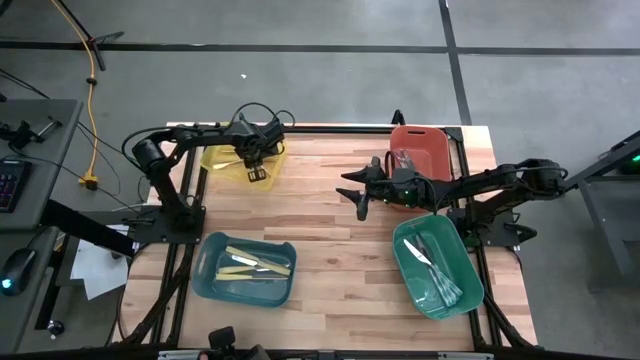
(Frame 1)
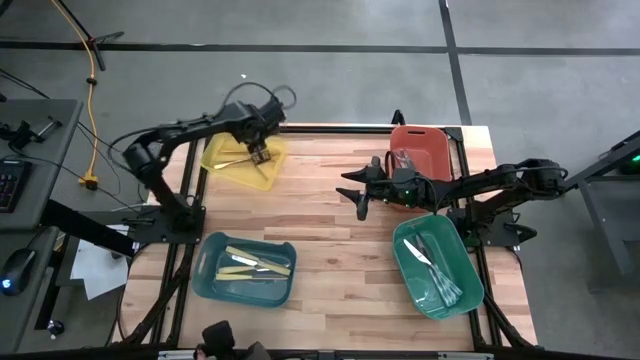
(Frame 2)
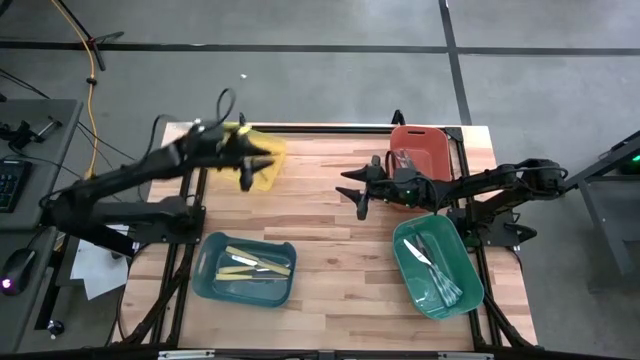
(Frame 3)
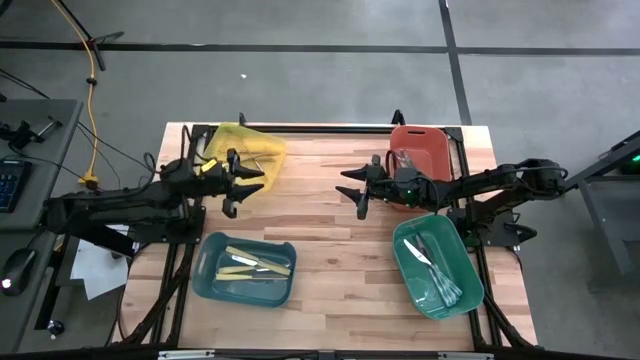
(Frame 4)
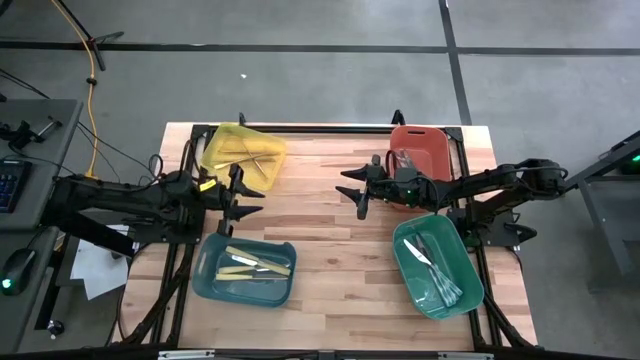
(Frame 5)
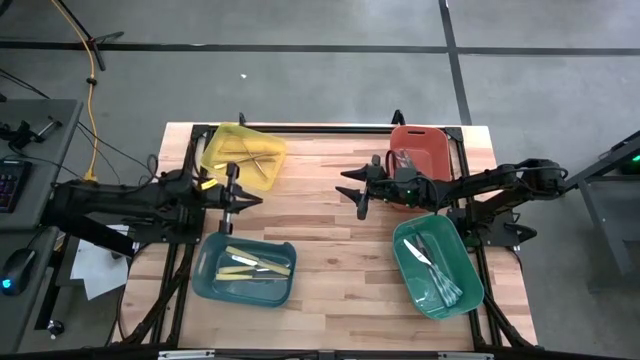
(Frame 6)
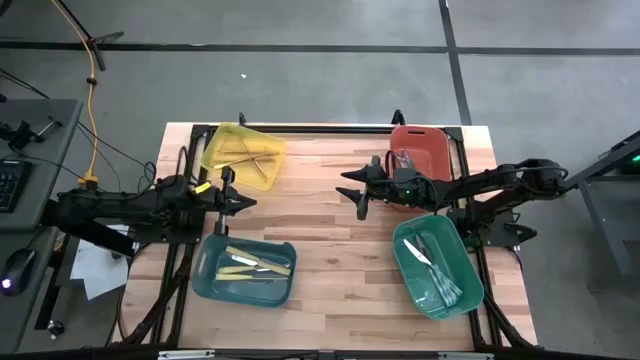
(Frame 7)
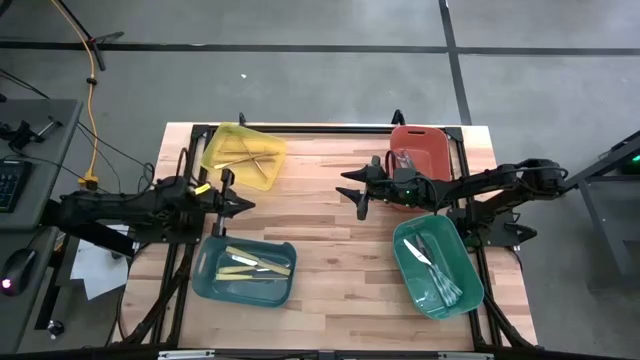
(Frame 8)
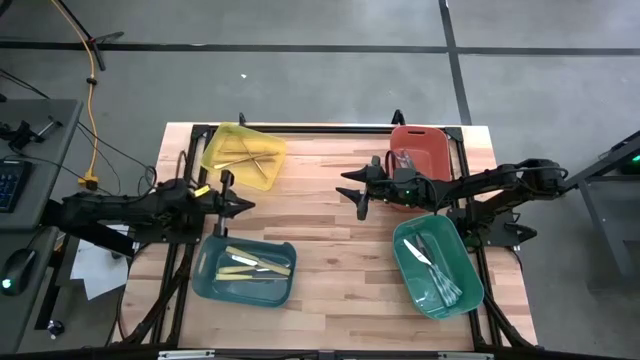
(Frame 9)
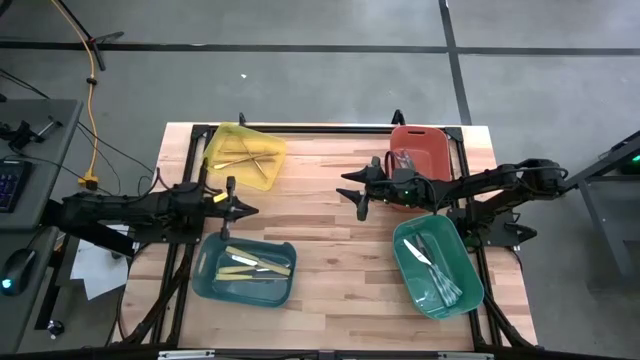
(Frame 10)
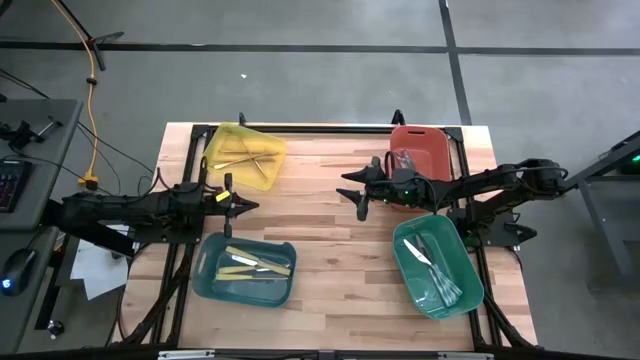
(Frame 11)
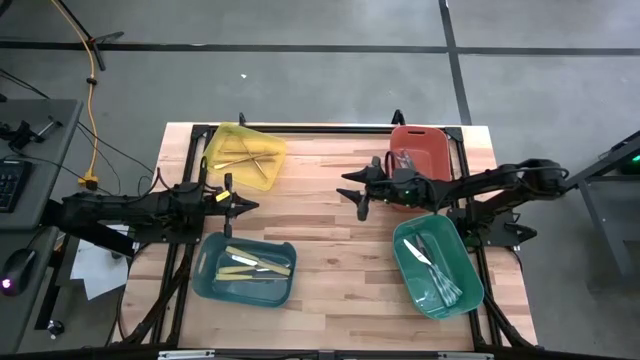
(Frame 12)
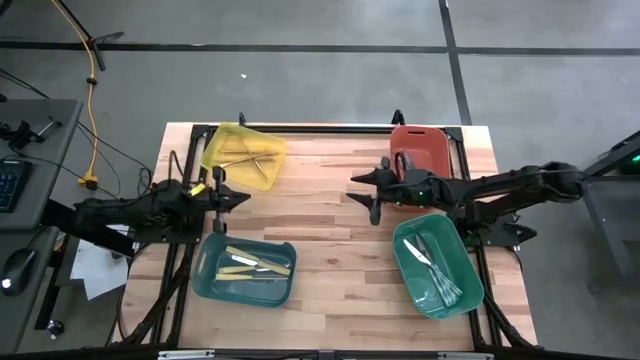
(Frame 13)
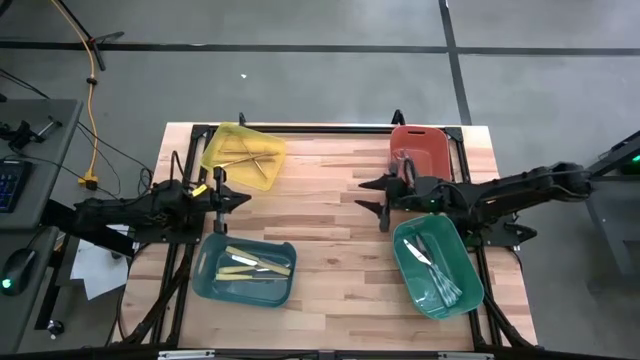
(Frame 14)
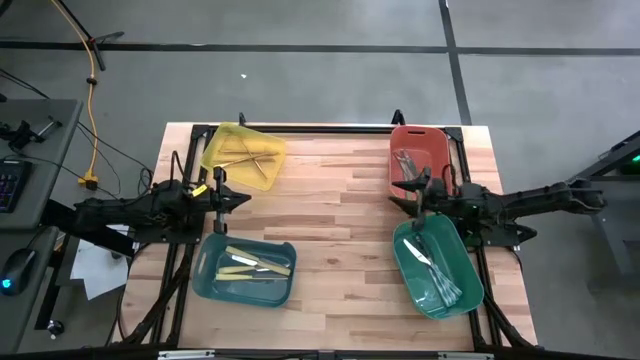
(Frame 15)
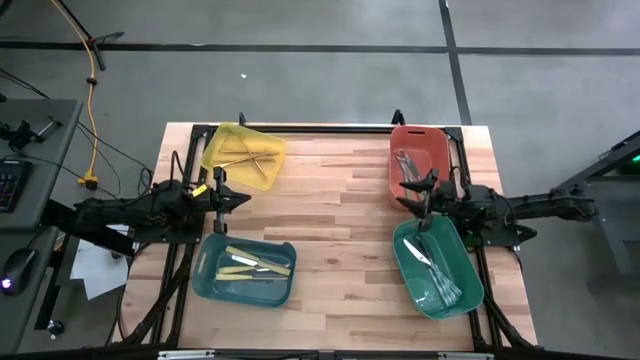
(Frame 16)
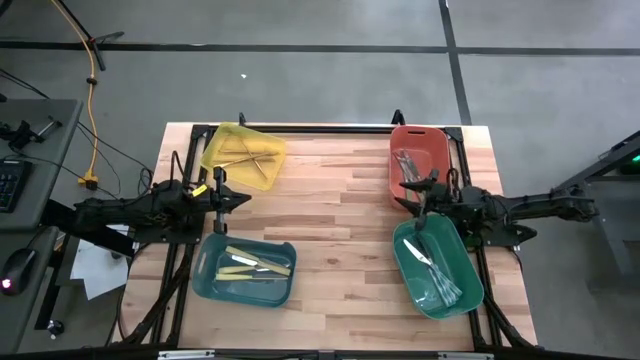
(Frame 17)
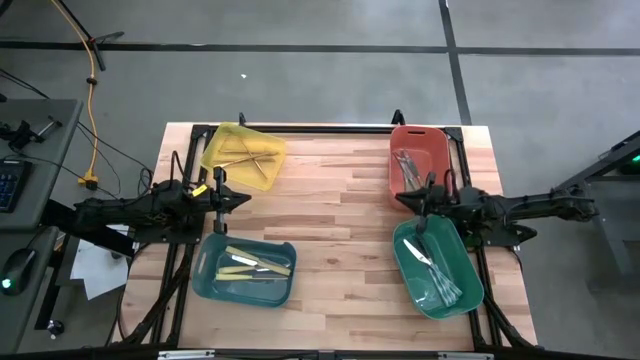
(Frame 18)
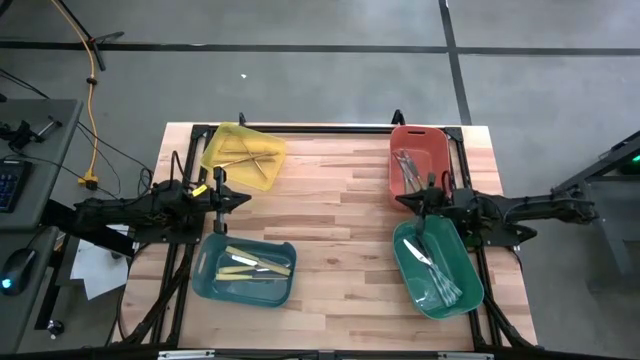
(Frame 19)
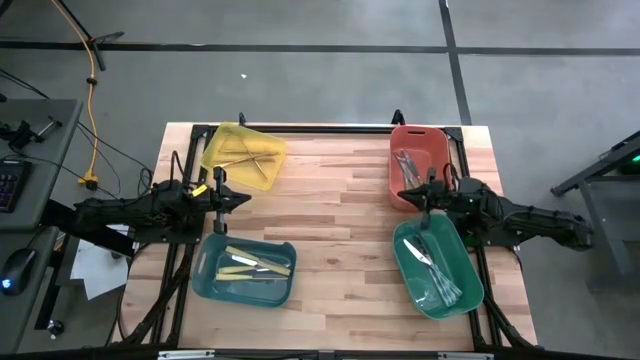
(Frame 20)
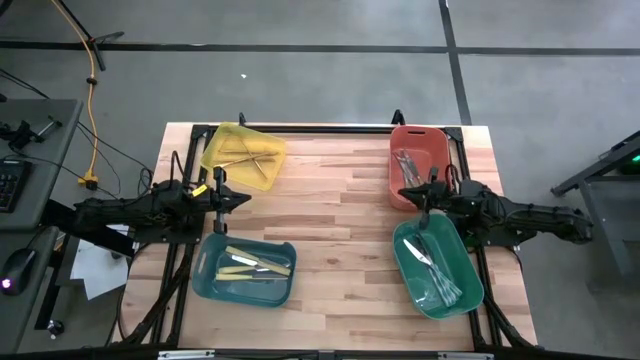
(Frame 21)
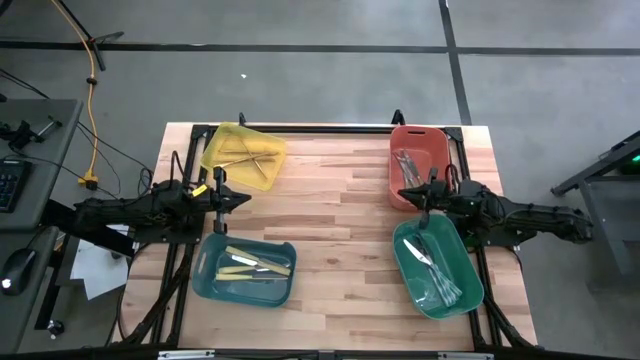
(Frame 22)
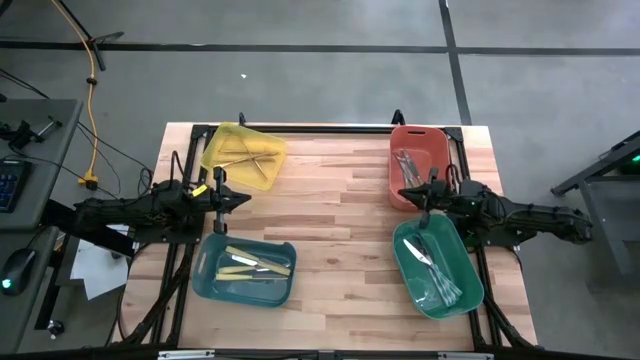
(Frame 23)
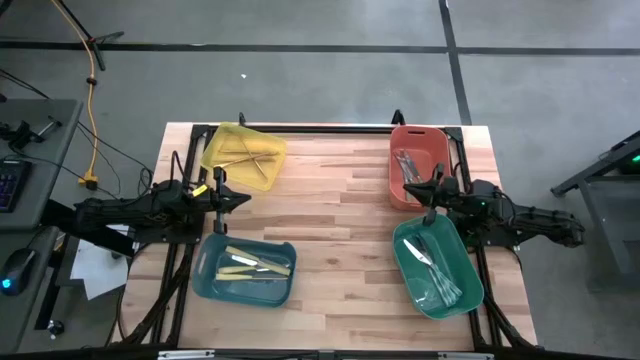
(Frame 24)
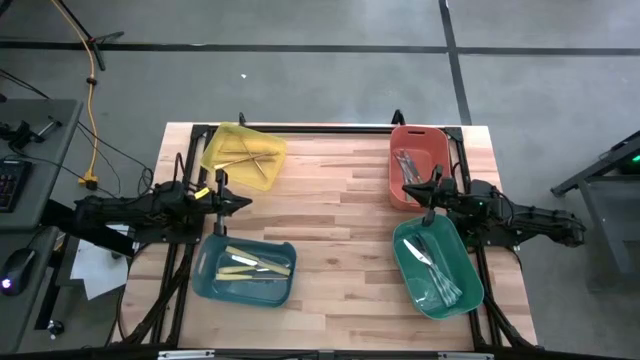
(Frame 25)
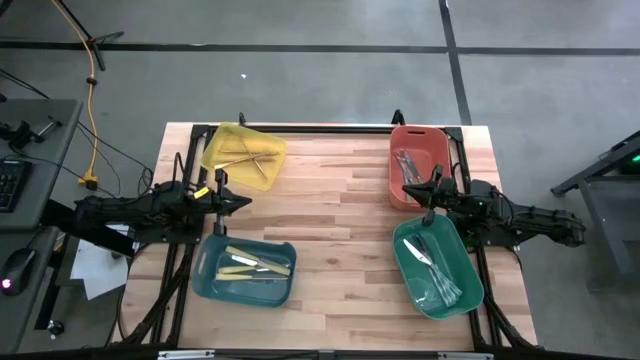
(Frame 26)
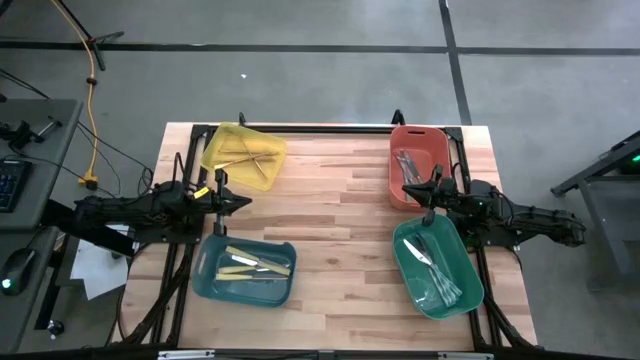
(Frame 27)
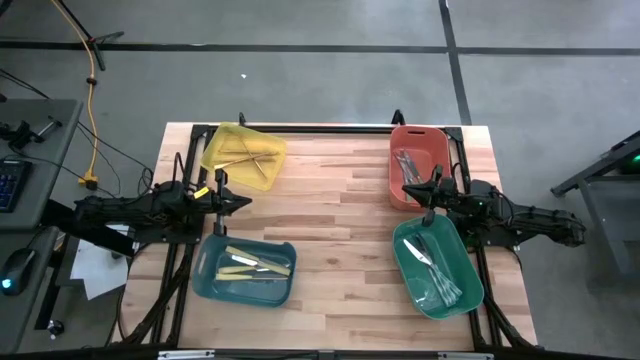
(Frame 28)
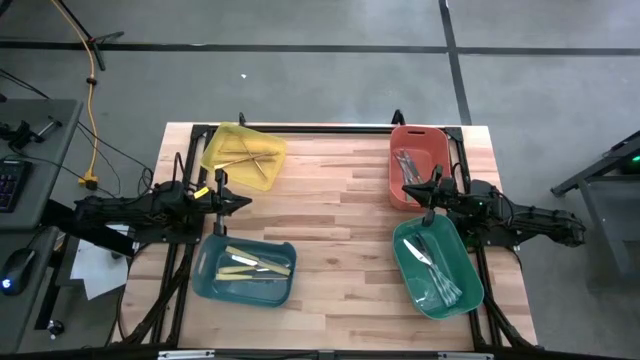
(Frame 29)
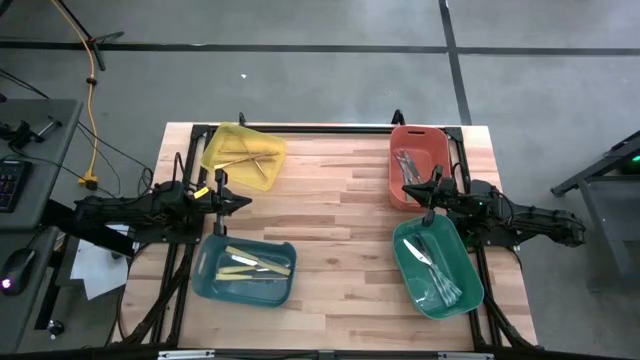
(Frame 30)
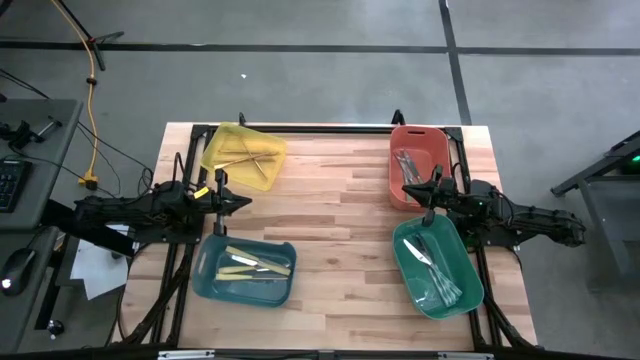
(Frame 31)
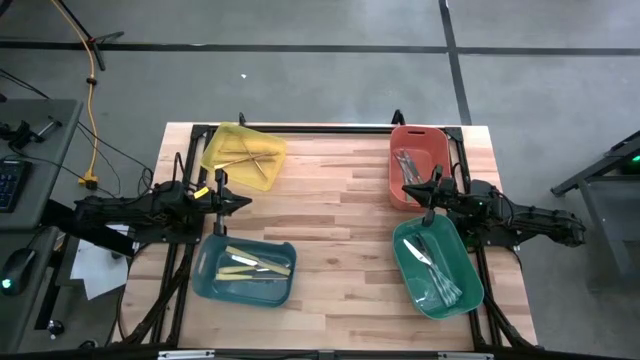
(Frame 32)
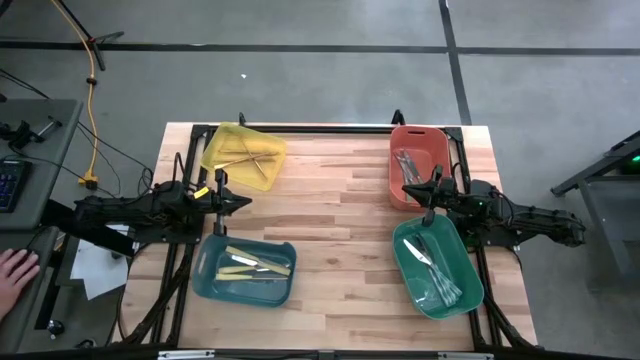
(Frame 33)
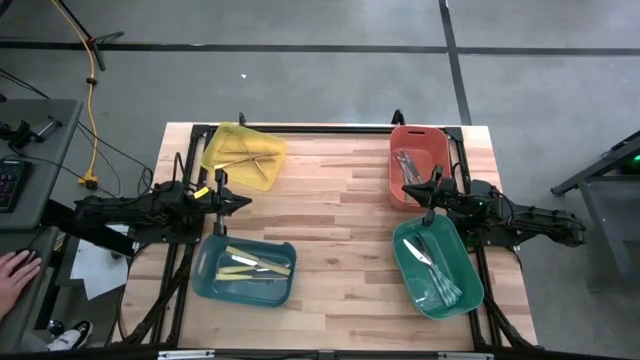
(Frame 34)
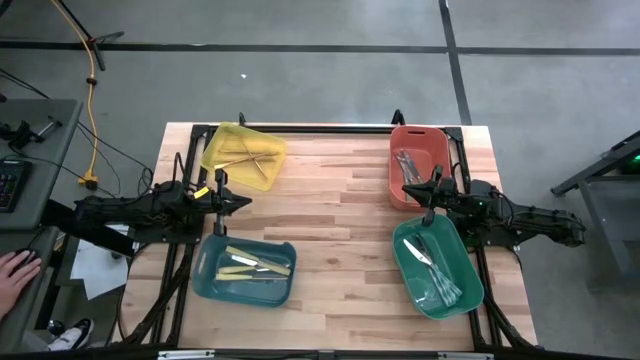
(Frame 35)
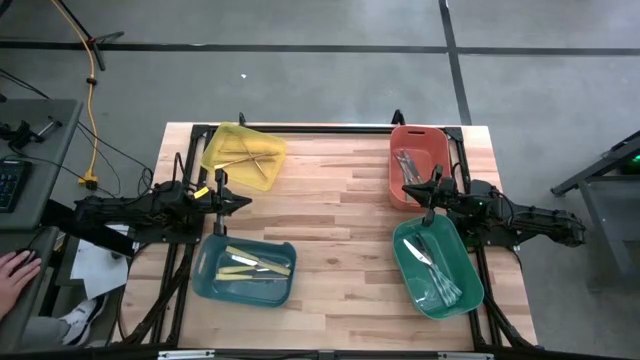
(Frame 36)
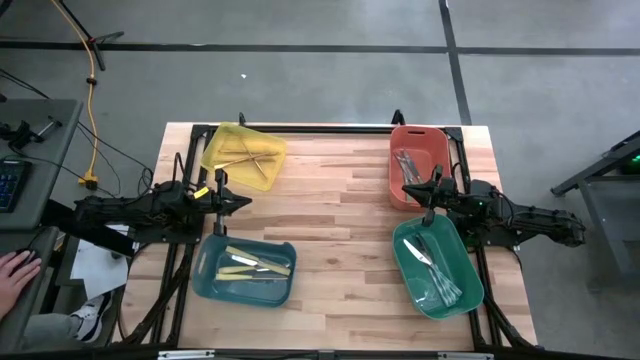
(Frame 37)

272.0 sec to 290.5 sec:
Task: Sort silverware by color (type)
Return to Home Position

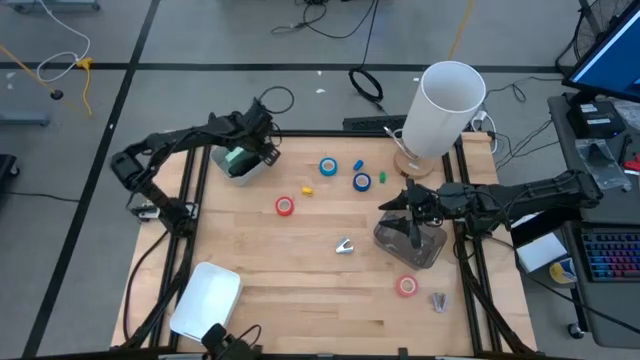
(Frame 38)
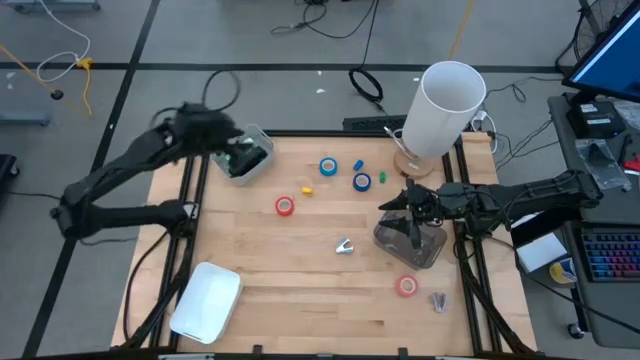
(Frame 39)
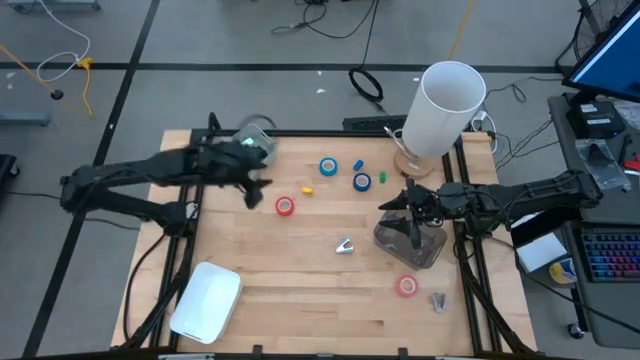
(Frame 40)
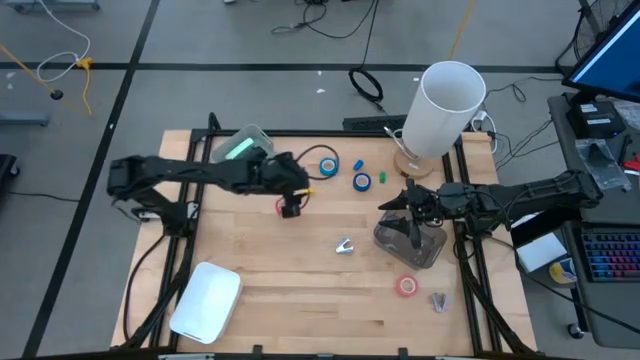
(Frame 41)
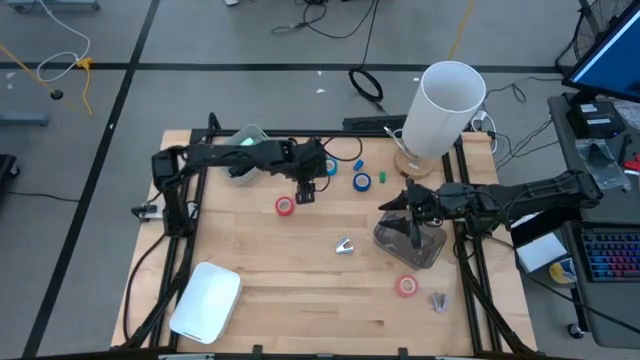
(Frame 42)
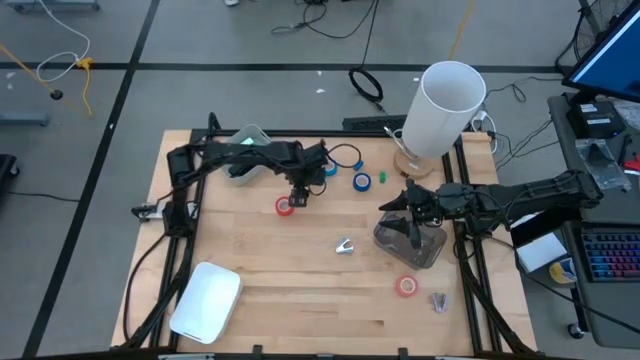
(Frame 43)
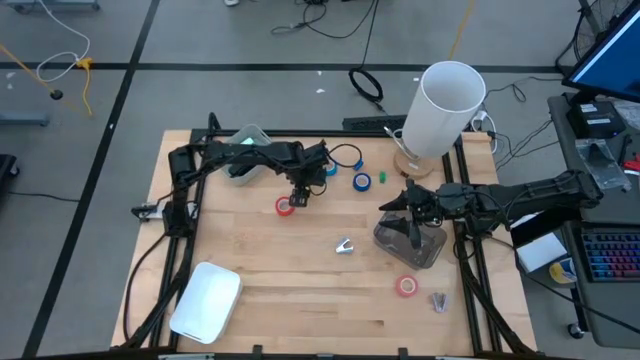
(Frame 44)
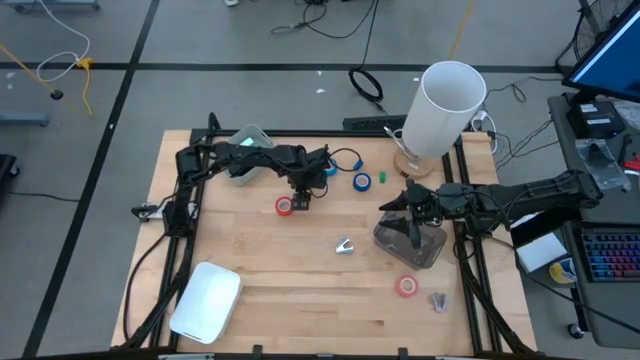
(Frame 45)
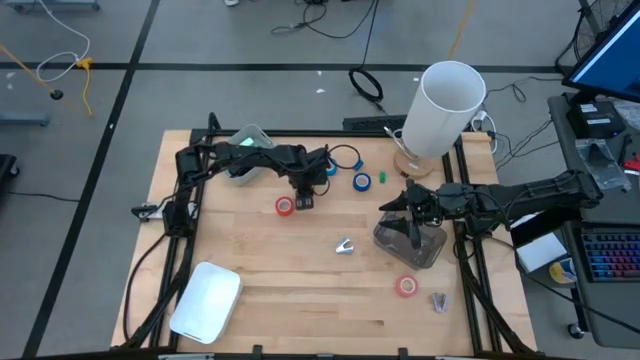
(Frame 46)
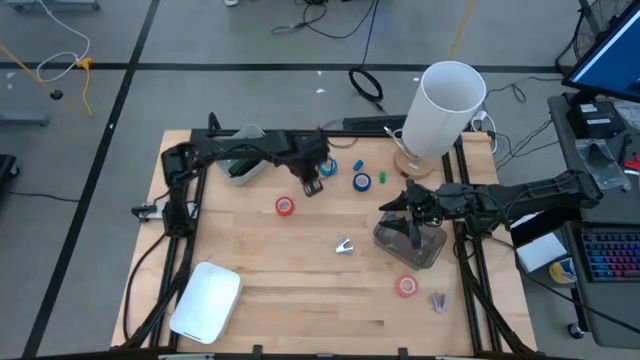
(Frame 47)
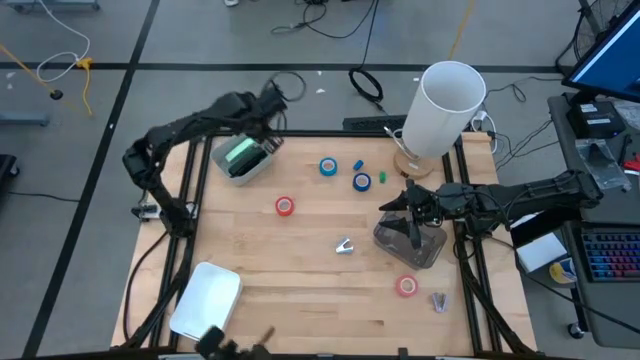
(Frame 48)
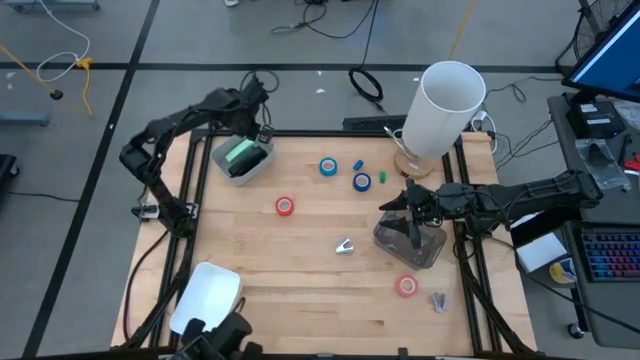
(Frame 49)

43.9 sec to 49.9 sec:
Task: Pick and place Stapler, Stapler remover, tape
Put the small yellow stapler into the gray bin
